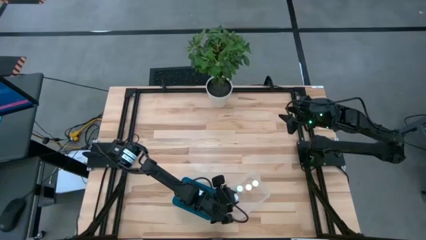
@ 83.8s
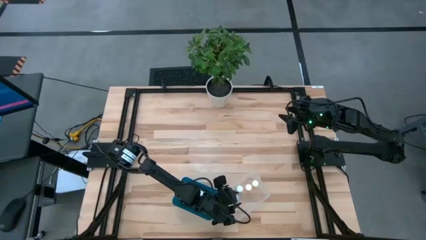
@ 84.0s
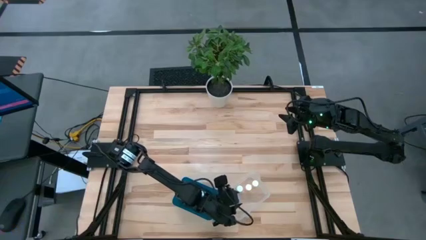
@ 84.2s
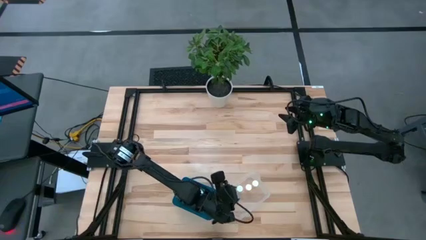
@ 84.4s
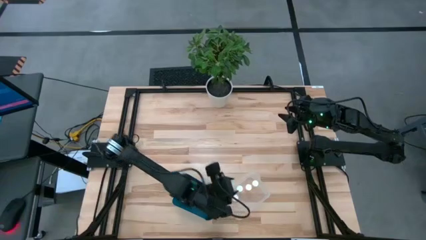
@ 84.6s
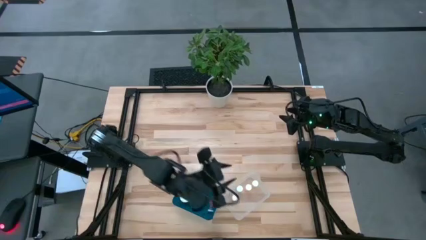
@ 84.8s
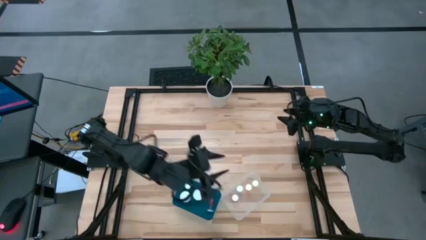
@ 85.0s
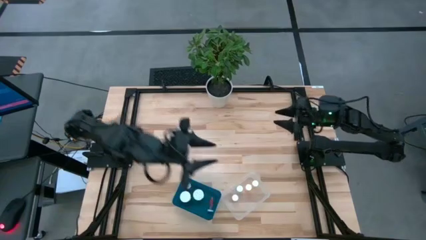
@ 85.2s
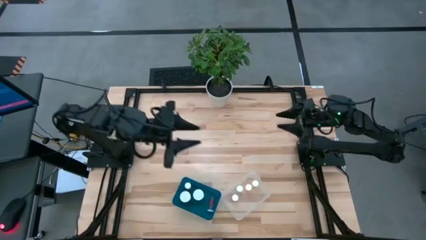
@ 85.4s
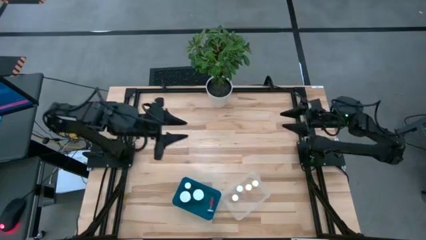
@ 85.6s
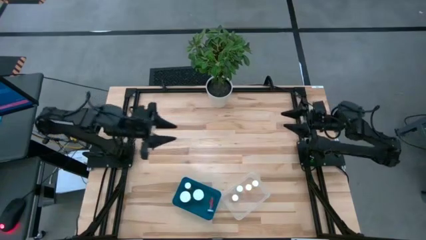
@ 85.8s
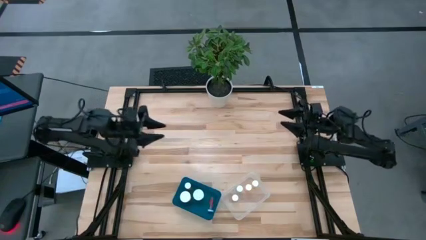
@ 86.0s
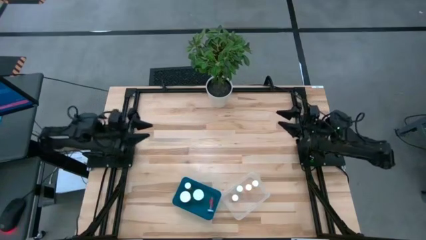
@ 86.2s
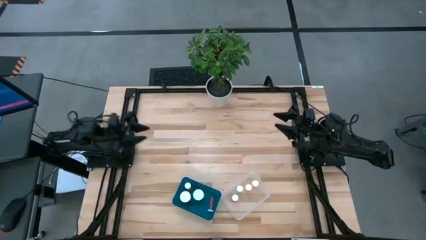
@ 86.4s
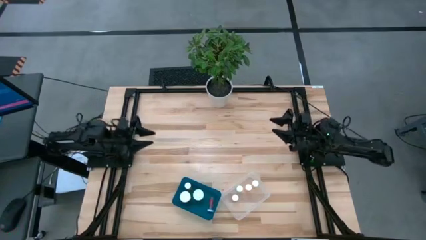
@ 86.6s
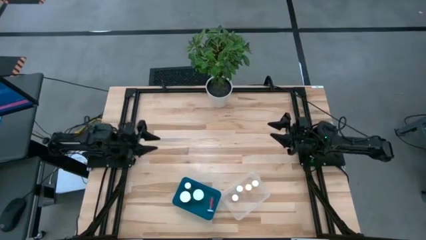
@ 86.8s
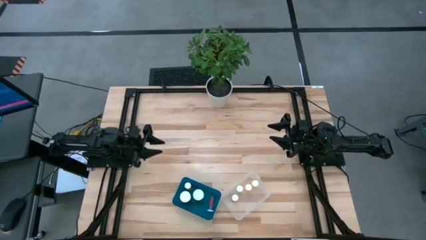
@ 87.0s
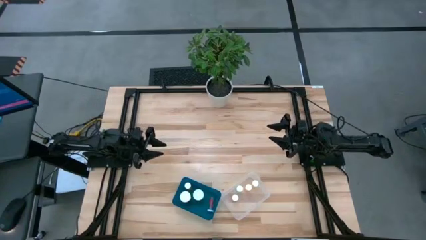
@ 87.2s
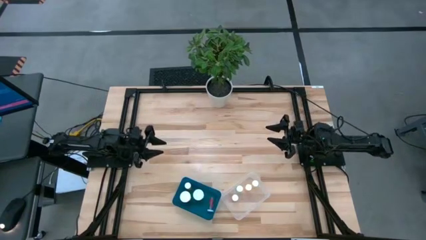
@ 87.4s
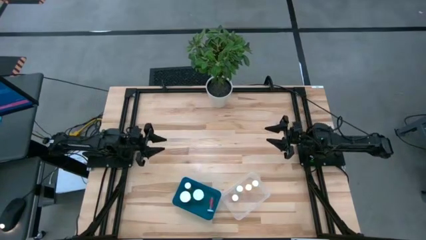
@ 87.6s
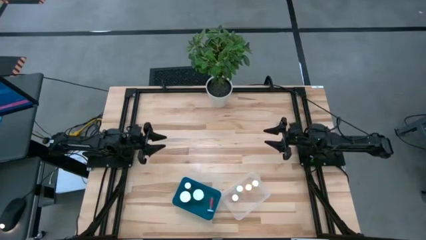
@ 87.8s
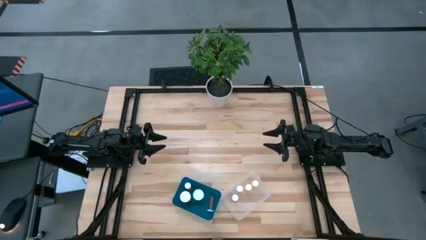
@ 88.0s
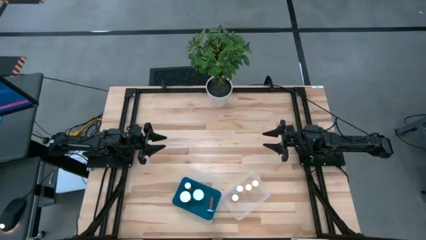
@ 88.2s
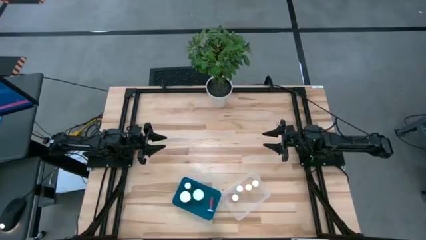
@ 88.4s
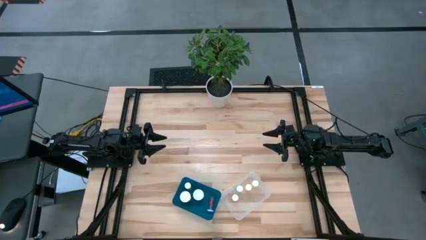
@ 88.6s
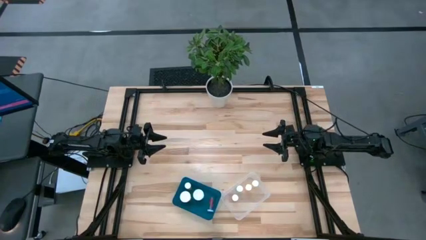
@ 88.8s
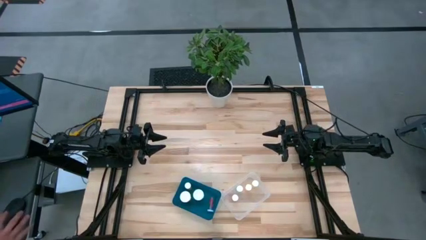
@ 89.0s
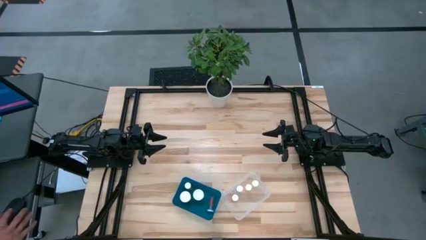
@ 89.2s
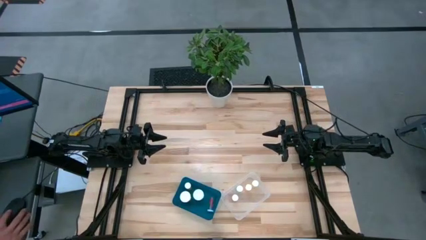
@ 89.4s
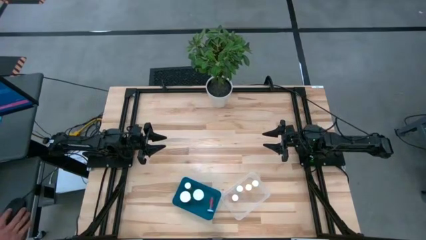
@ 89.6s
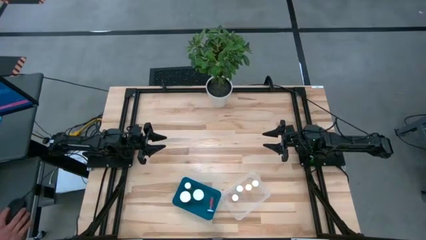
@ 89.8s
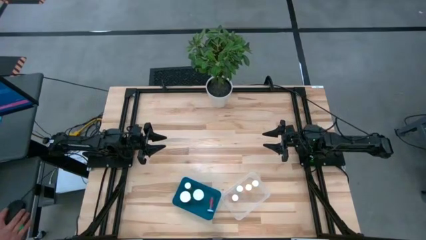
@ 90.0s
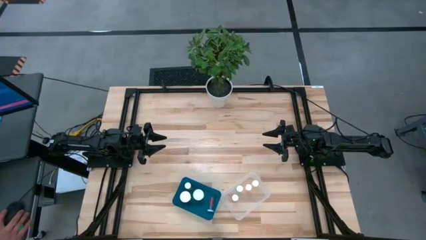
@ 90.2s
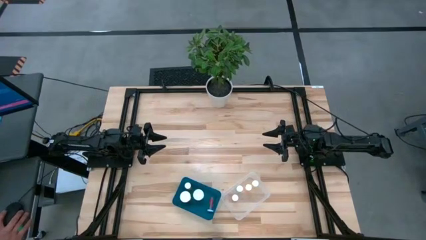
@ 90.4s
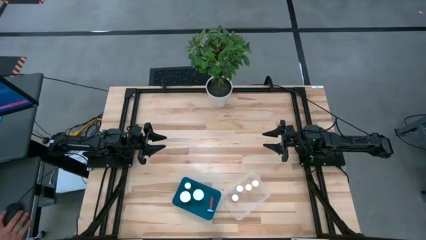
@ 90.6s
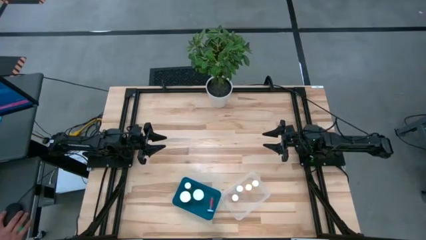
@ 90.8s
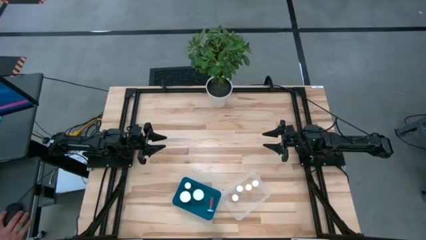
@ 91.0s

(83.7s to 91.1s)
Task: Pick and place medicine bottles into bin by pill shape (circle, oval)
Return to Home Position

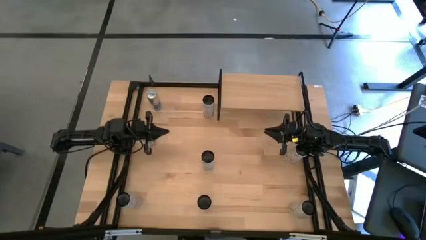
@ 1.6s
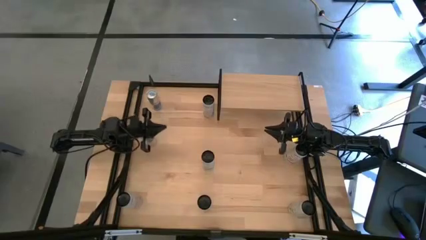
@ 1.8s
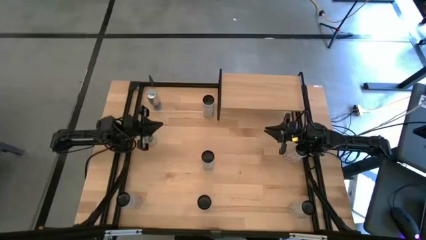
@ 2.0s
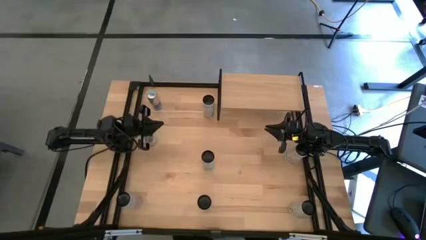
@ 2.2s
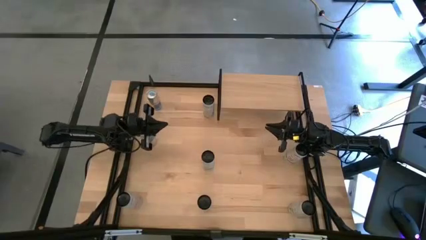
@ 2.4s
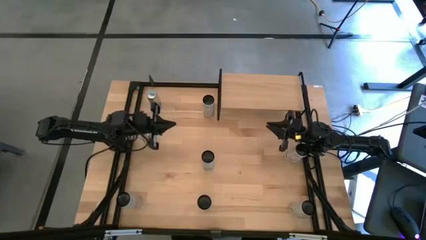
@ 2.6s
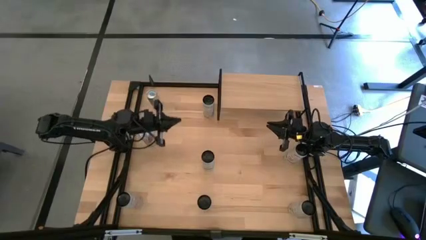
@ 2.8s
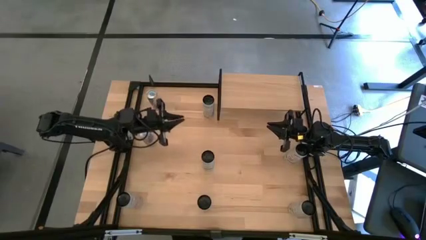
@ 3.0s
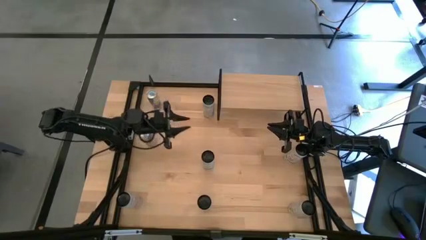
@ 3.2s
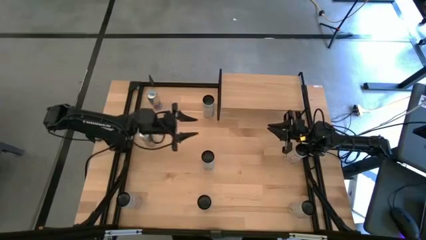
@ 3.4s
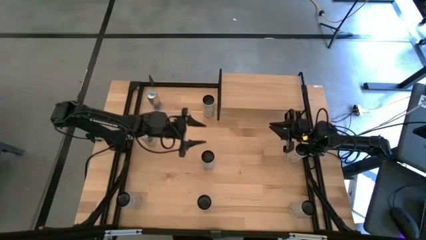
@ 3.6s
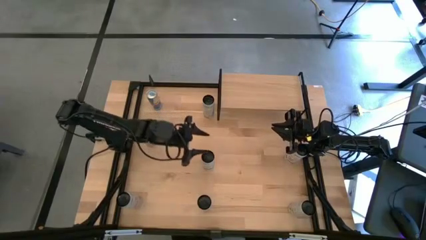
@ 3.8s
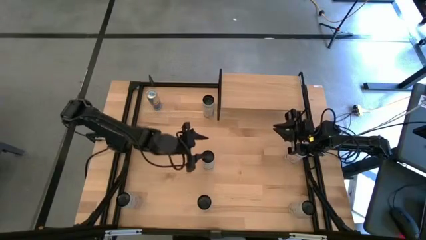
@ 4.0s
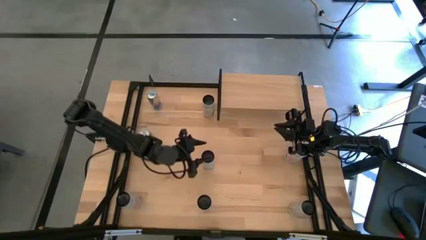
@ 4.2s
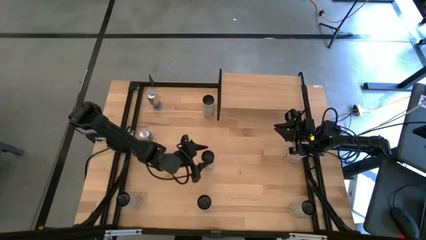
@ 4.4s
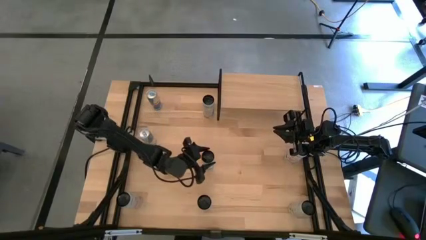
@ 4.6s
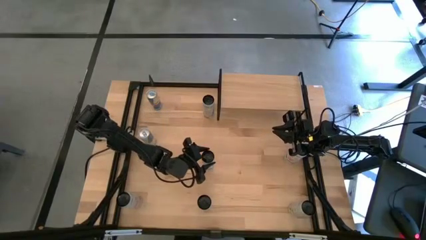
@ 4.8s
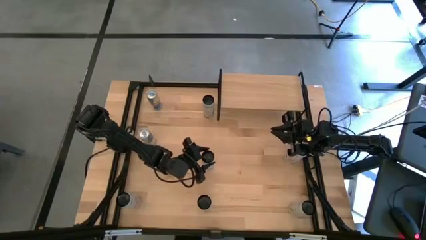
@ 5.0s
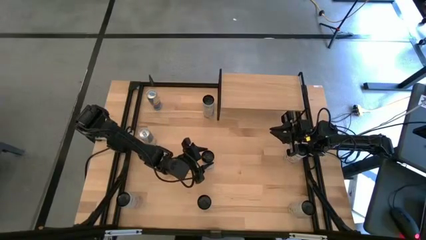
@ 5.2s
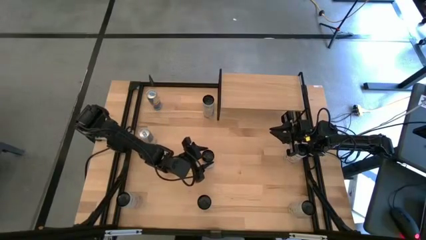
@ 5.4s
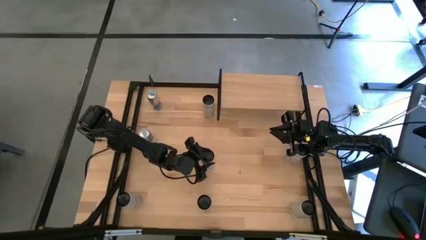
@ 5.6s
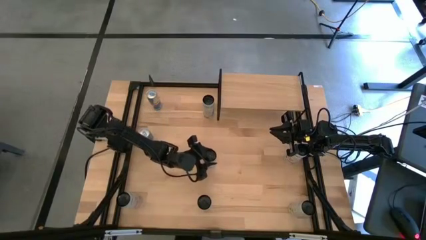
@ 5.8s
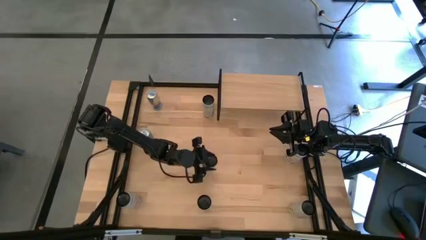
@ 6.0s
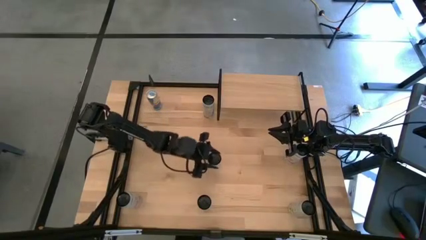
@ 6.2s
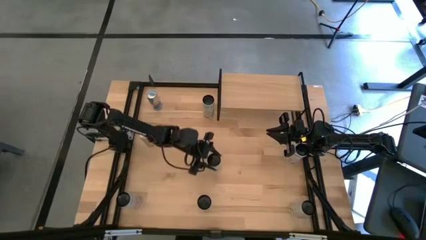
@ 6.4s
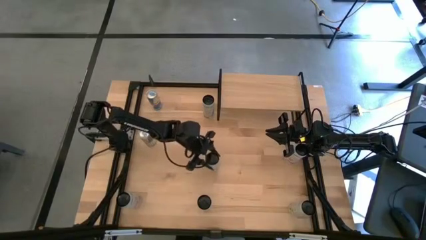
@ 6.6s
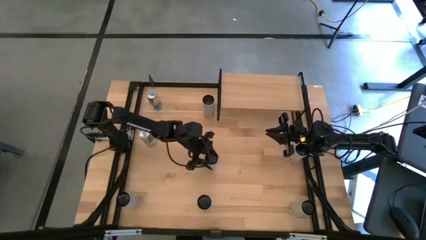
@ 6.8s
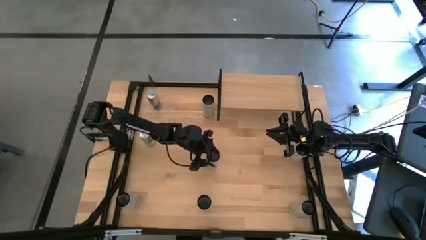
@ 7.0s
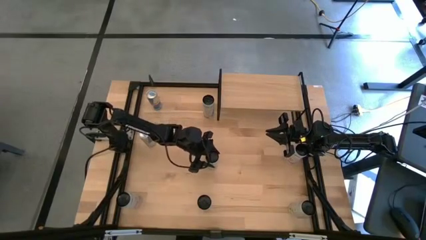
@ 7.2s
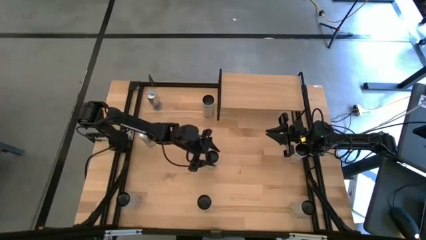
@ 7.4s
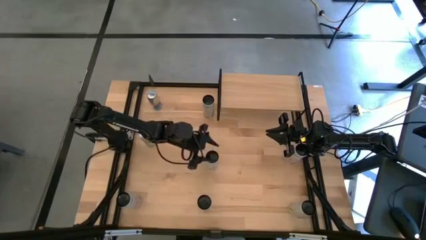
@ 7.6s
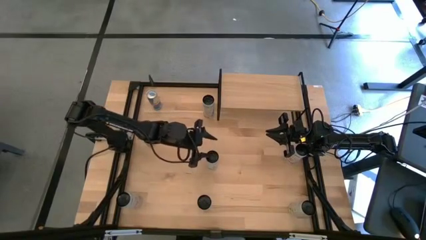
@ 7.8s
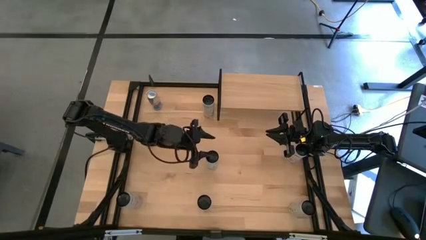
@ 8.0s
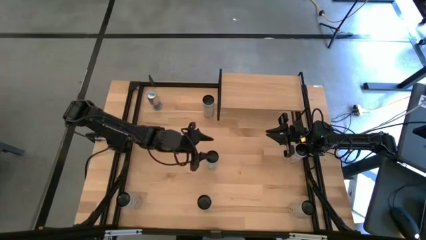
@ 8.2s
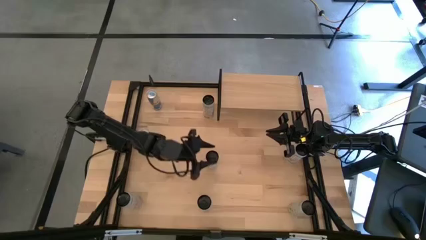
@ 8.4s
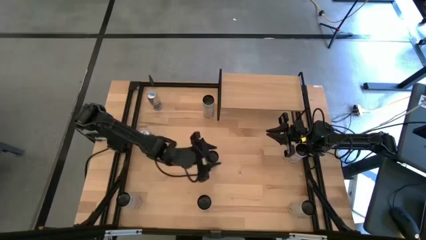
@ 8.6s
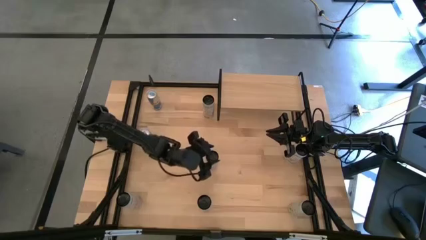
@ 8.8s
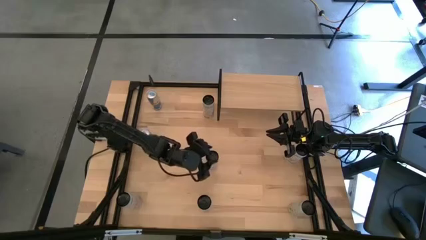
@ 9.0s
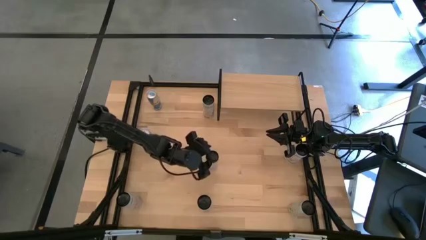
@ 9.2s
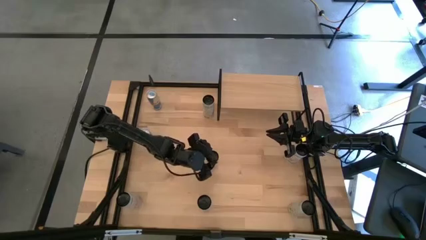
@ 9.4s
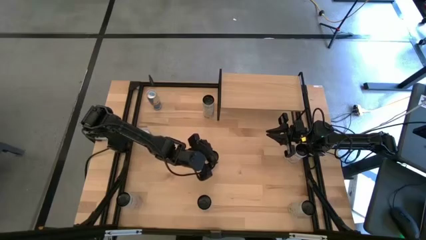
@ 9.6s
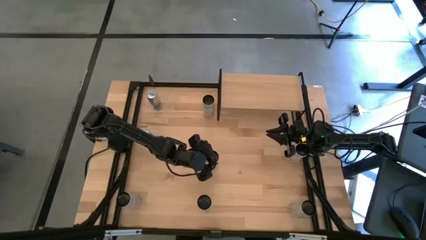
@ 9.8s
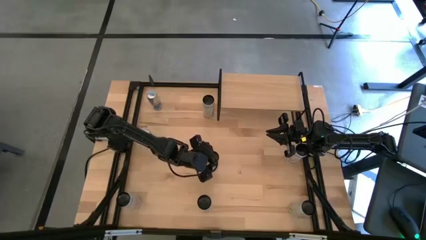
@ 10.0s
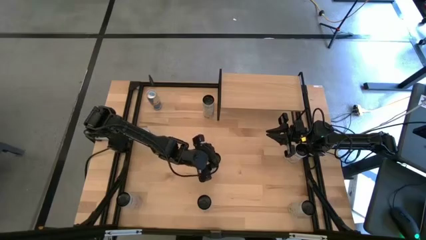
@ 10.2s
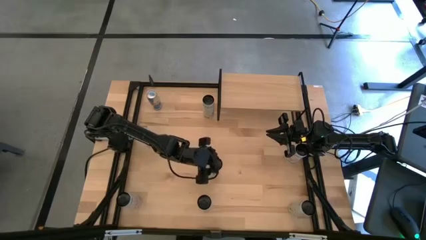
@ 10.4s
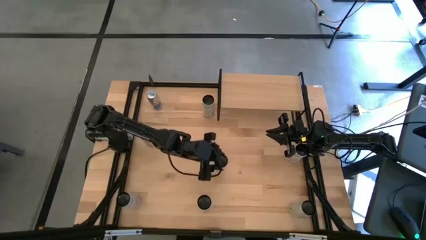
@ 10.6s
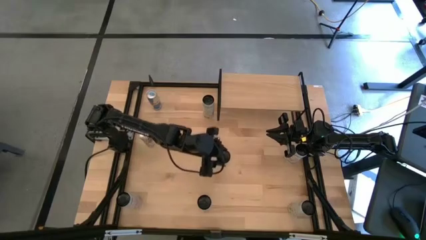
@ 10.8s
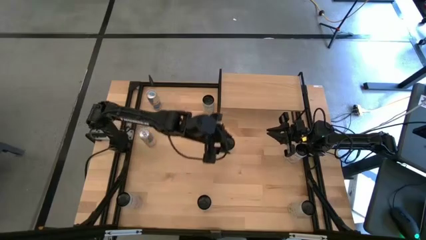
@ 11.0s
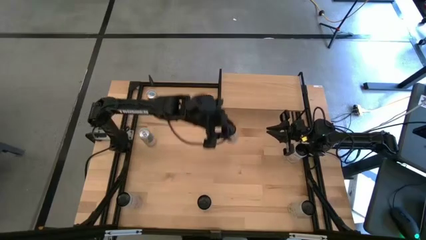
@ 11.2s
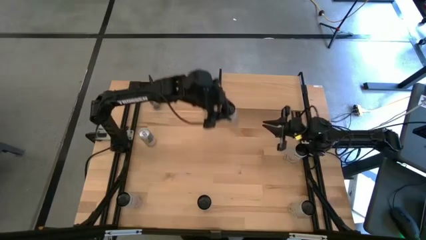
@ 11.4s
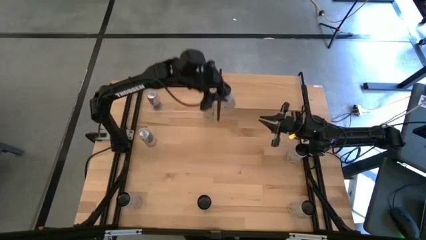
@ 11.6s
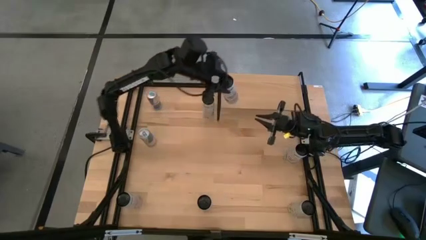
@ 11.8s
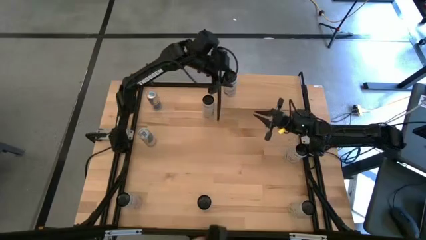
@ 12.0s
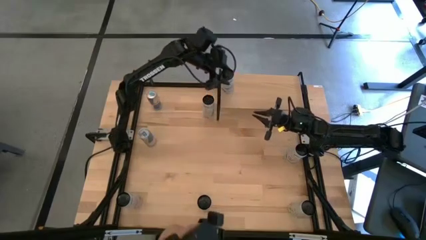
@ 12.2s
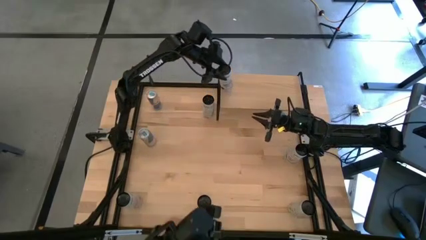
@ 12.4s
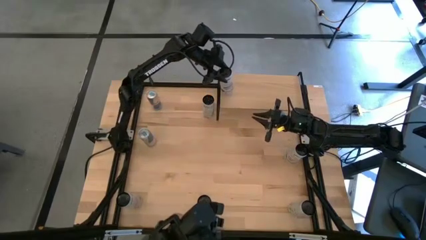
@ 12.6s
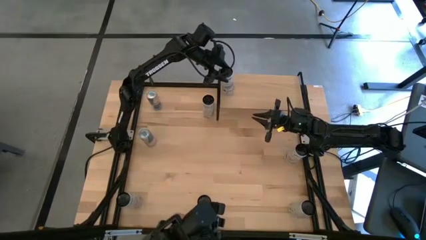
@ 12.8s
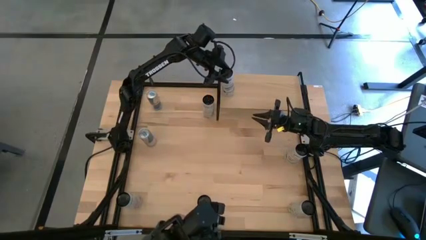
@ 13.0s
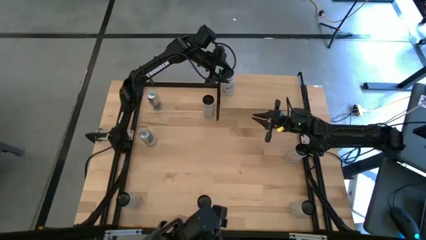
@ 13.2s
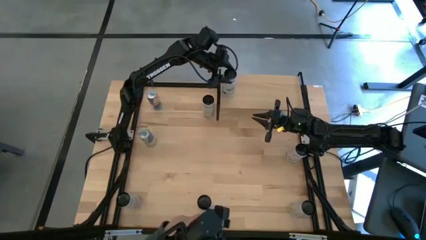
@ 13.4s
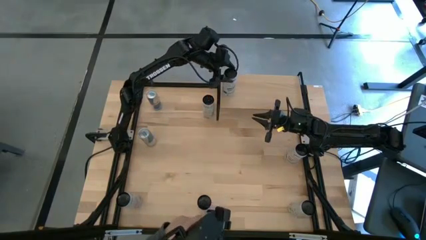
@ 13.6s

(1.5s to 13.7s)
Task: Place canned beverage on shelf
Put the top white blue soda can on the shelf
